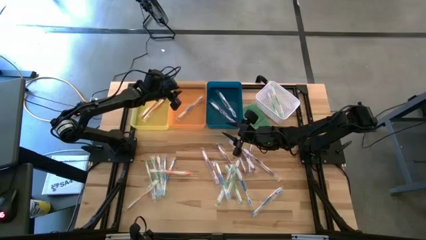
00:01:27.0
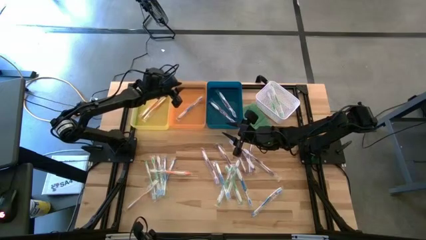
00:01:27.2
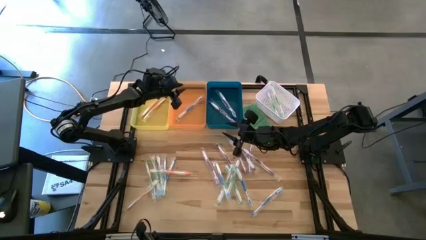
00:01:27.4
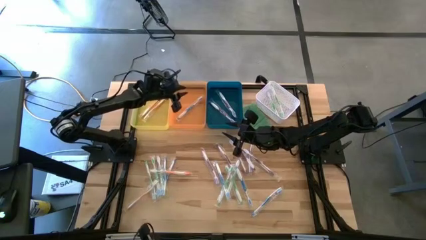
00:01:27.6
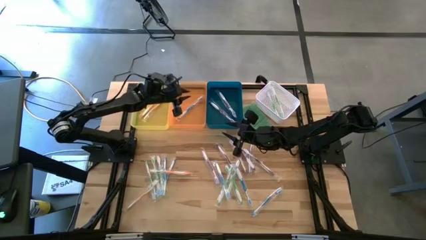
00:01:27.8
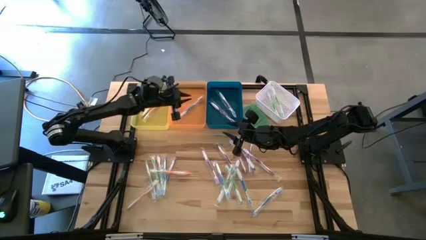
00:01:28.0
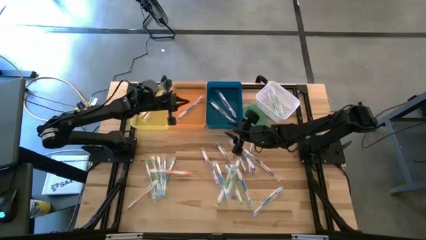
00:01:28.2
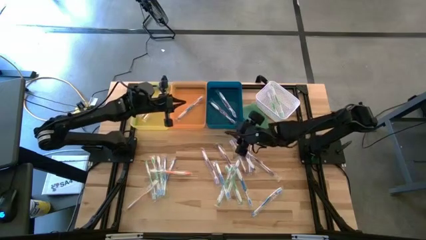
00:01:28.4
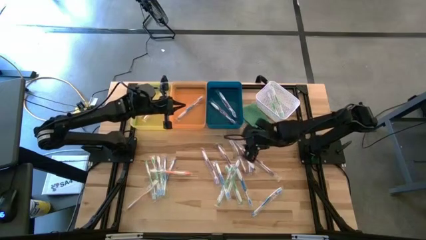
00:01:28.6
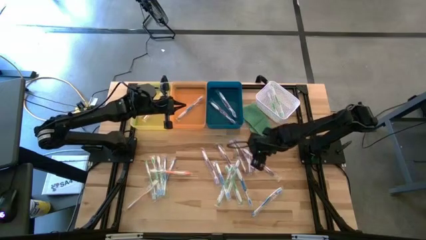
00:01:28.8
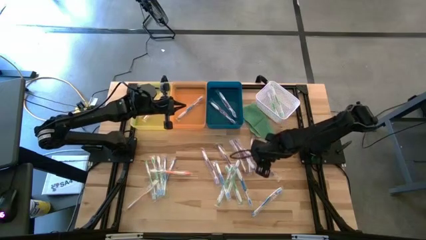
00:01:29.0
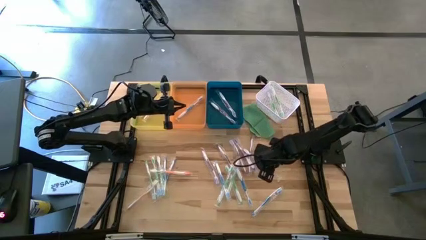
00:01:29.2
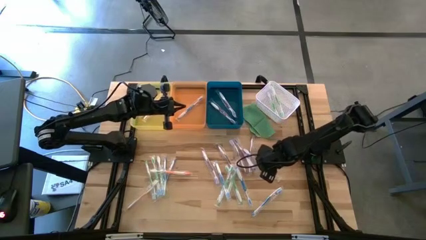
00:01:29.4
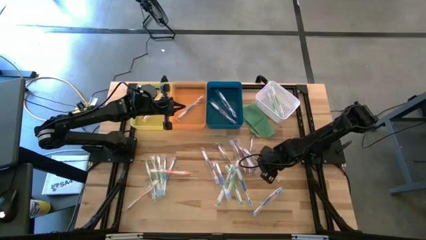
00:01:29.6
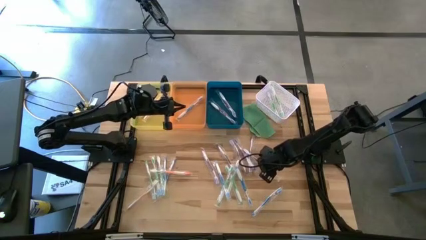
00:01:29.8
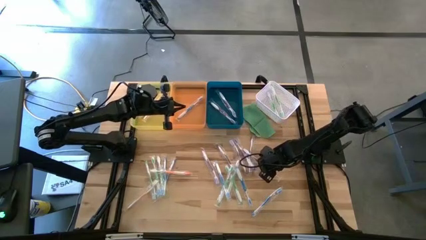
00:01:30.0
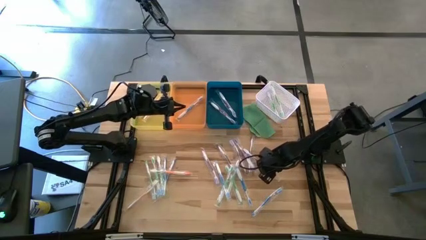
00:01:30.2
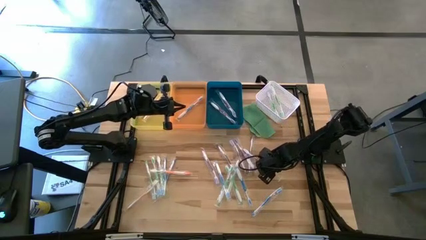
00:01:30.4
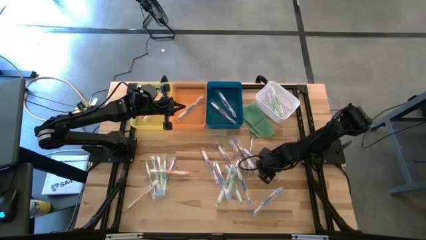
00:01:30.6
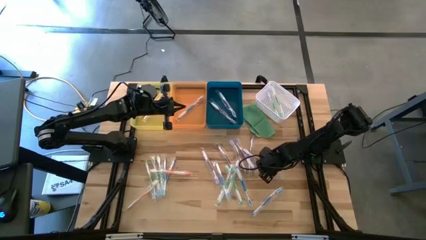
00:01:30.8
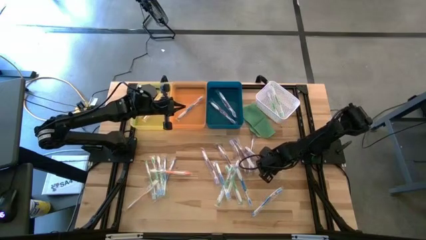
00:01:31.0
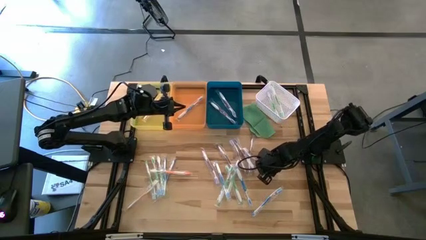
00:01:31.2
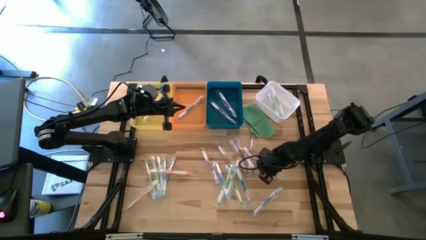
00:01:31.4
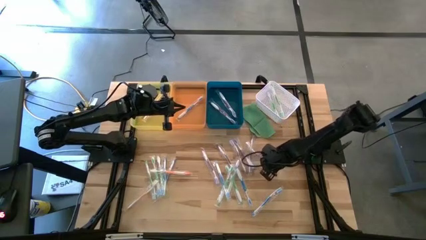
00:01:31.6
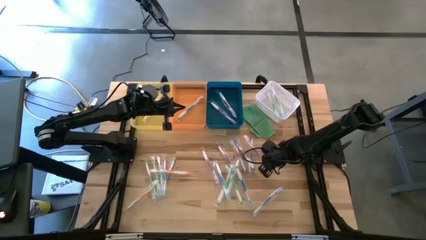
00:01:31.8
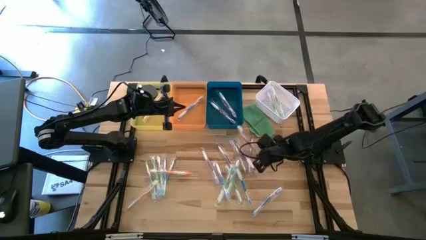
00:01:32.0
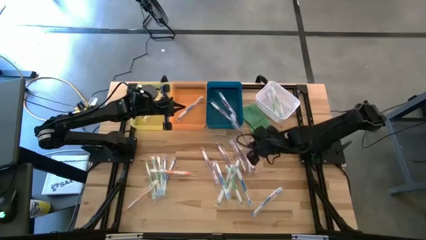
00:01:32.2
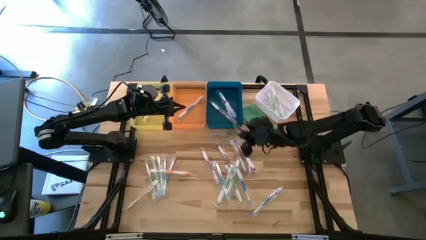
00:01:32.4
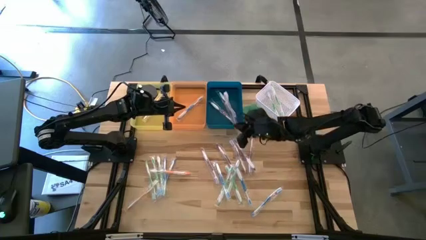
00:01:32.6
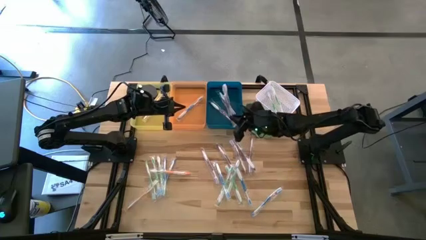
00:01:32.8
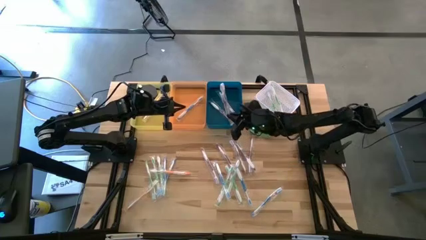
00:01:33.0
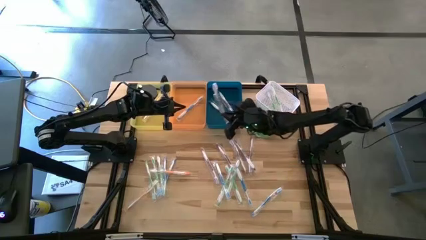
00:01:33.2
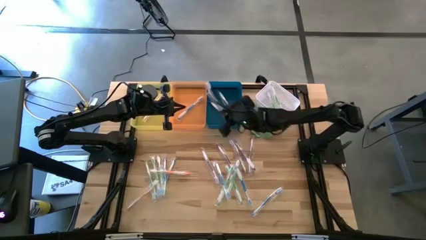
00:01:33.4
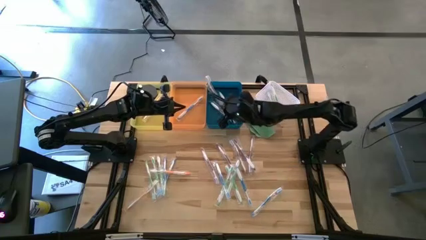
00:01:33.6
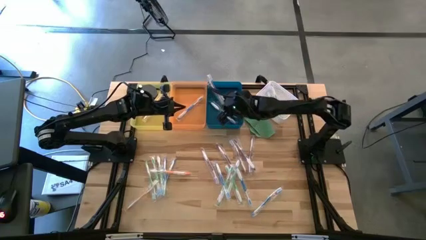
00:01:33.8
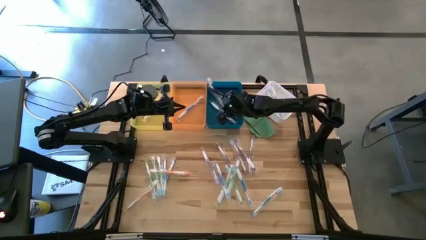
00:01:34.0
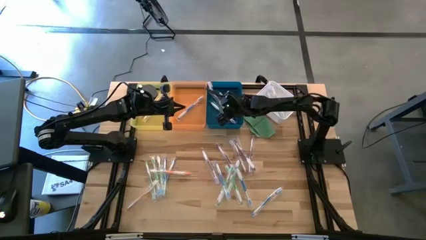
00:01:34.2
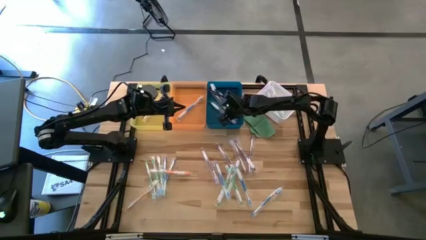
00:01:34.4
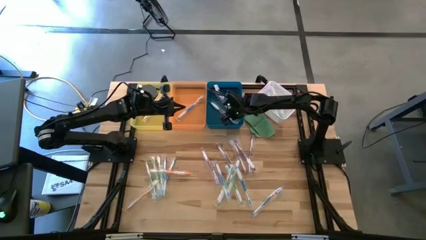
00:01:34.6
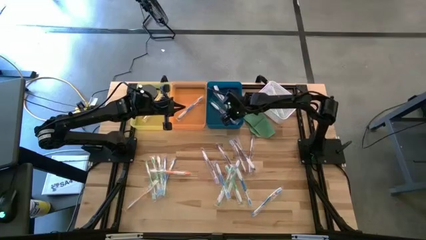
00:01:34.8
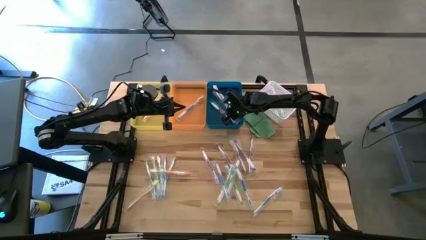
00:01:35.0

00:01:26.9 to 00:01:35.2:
Task: Pick & Place Toothbrushes
Put the purple toothbrush into the blue bin

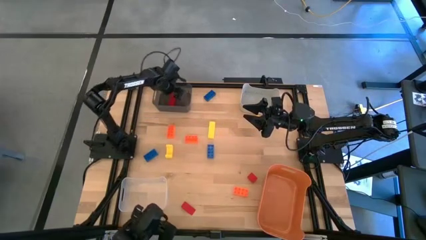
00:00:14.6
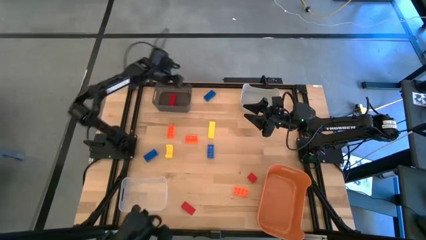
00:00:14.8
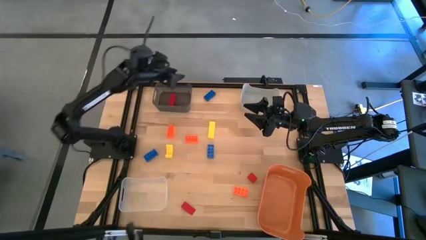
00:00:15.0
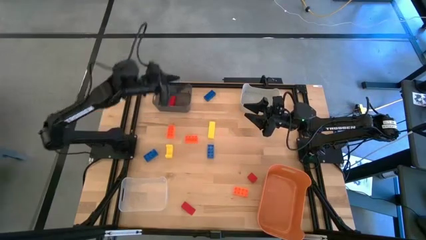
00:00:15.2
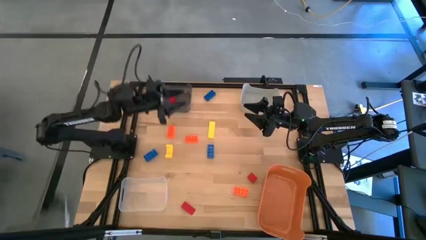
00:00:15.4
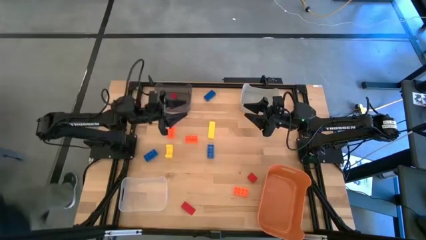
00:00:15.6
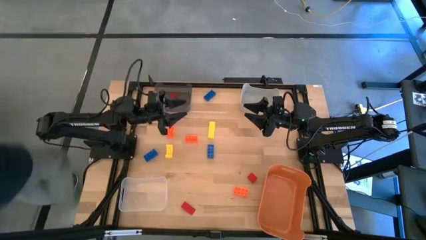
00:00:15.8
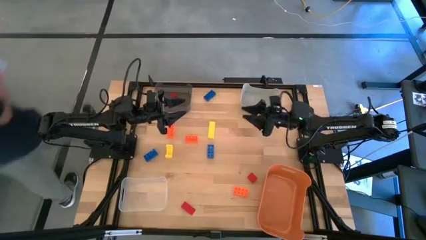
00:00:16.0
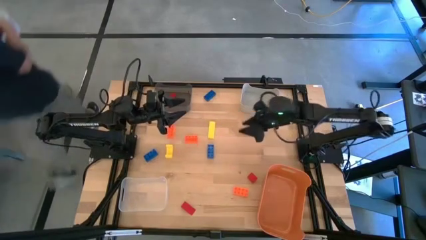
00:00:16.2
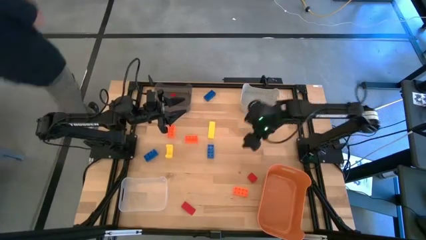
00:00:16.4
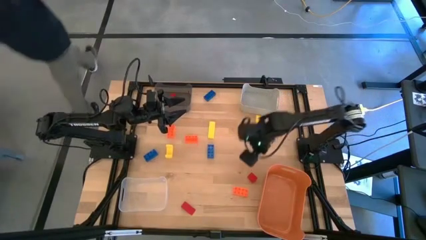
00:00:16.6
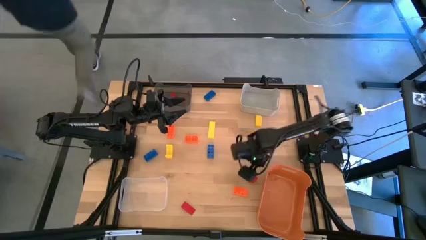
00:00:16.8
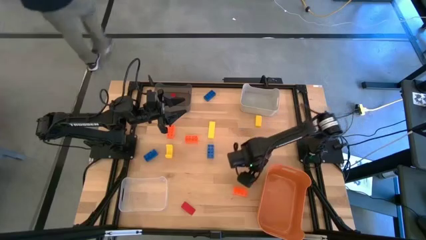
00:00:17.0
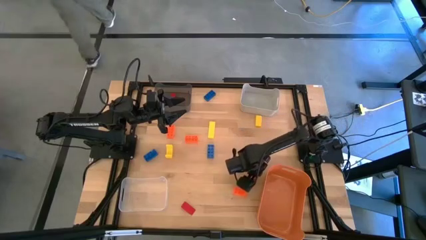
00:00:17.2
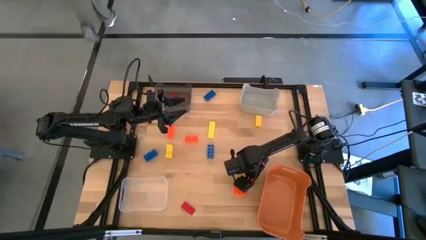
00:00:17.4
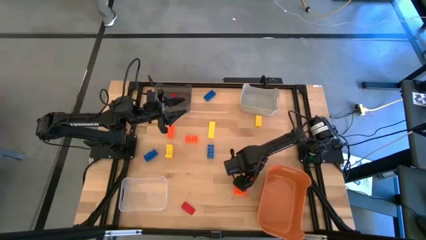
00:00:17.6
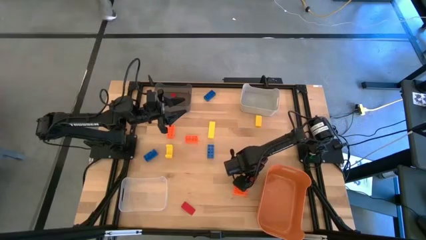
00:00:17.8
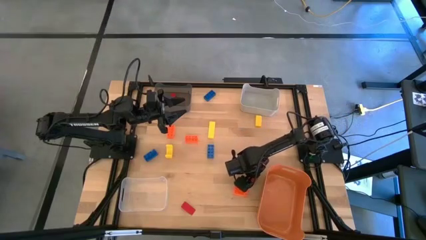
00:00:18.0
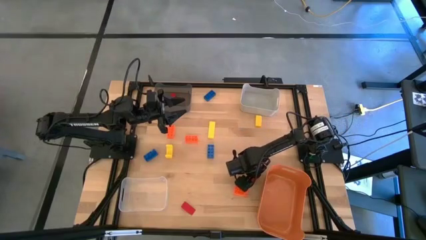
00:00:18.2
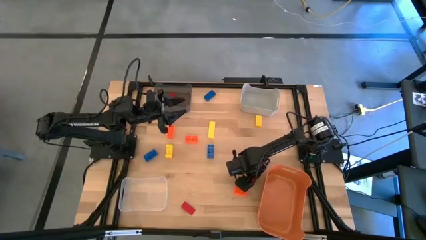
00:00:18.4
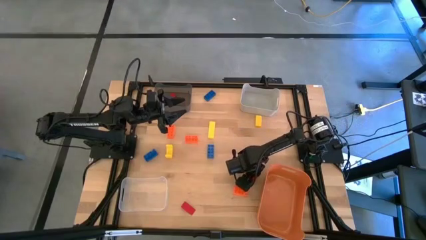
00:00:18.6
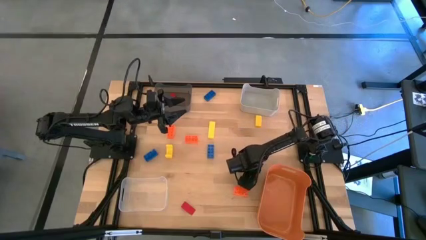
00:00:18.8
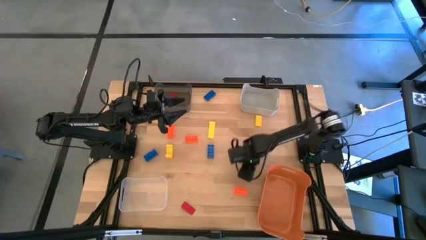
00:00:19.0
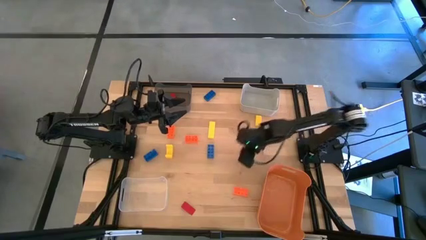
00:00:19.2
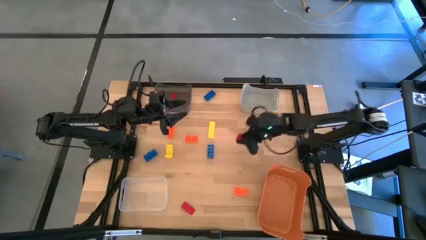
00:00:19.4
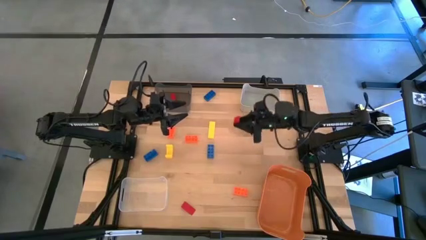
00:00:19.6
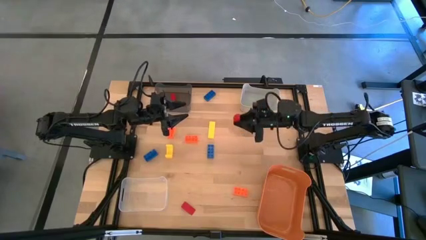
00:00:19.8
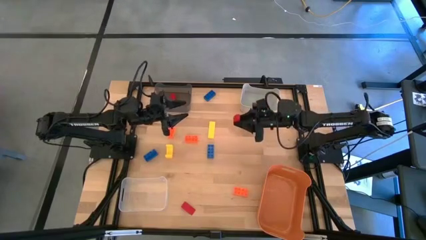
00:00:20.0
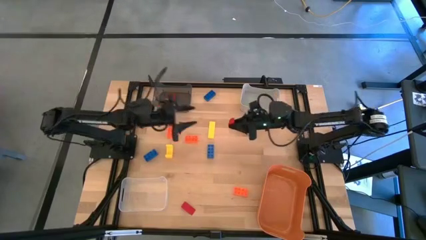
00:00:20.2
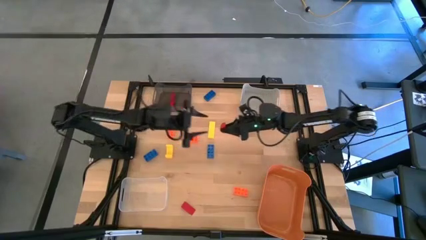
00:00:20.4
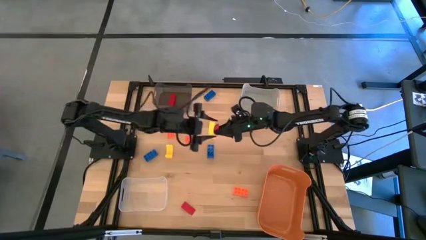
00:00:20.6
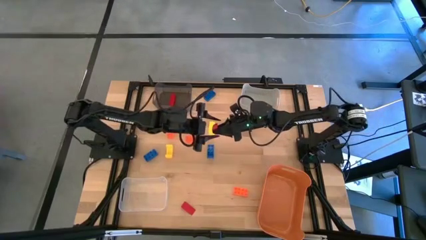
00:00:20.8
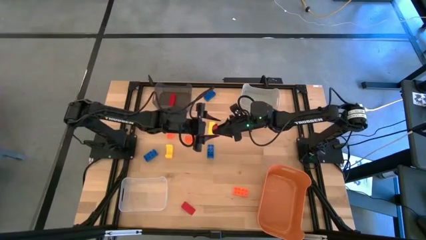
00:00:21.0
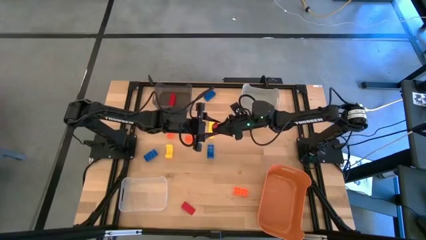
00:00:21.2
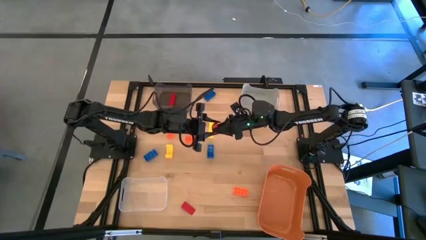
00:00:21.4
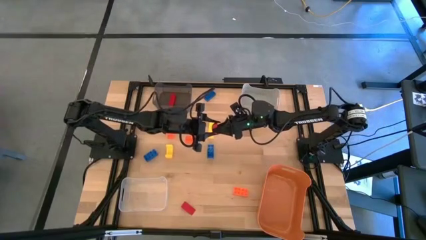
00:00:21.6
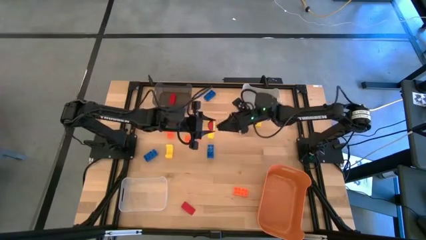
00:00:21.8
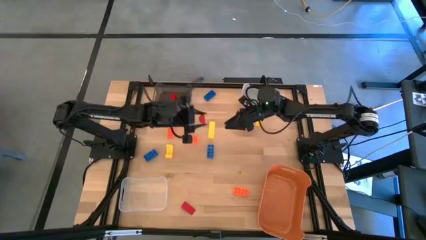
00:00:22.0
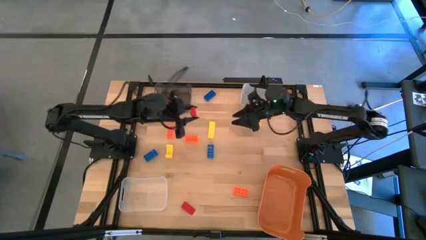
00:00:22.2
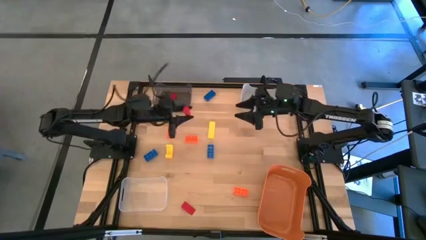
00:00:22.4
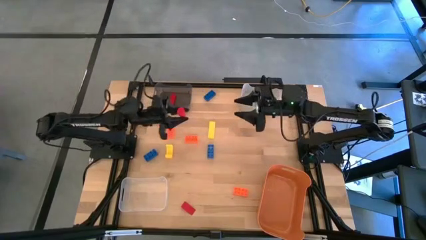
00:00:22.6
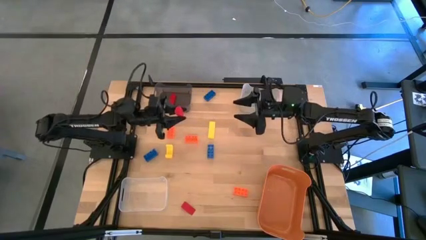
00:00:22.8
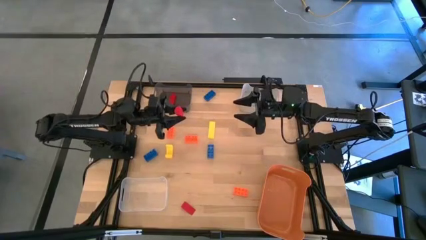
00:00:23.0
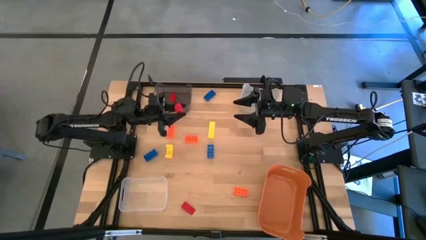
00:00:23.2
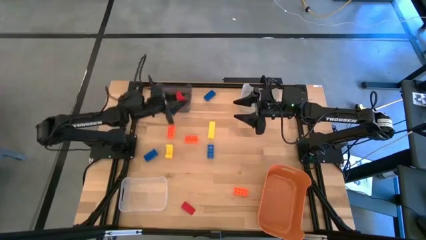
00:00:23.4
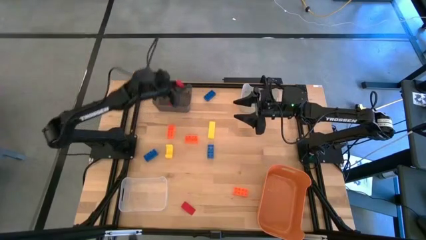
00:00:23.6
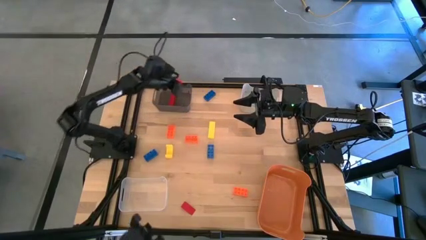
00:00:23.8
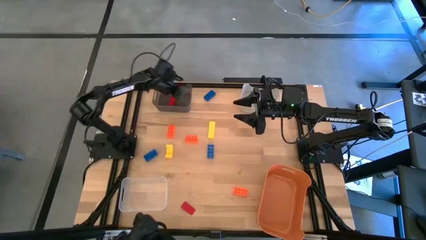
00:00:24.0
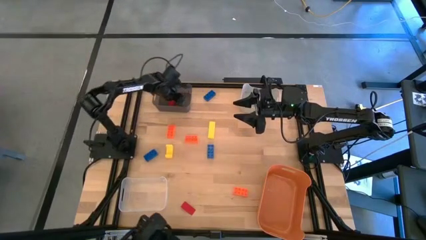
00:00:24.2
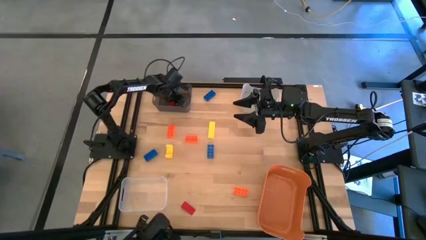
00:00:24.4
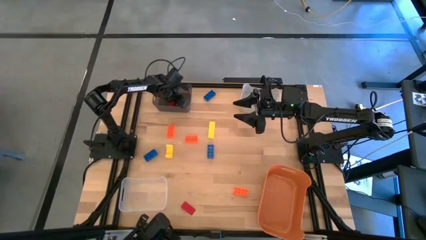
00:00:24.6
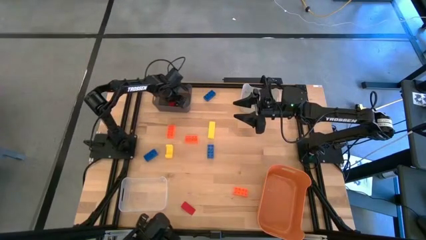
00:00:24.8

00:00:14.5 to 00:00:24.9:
Task: Sort & place blocks by color
Put the right red block into the black bin
